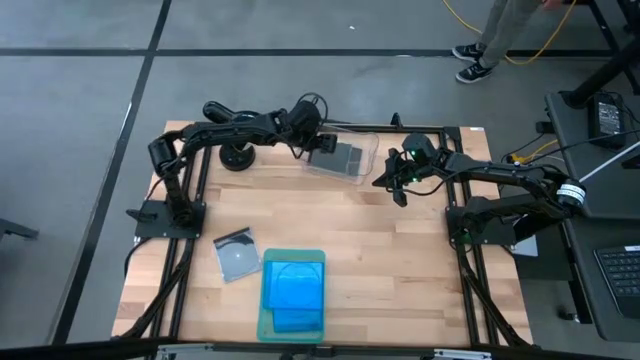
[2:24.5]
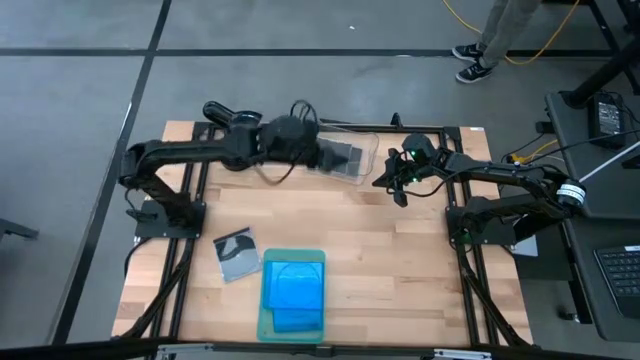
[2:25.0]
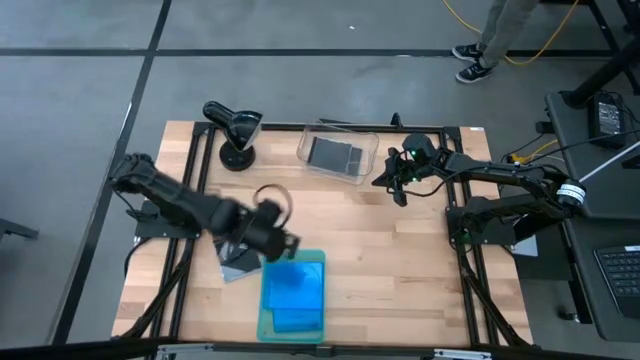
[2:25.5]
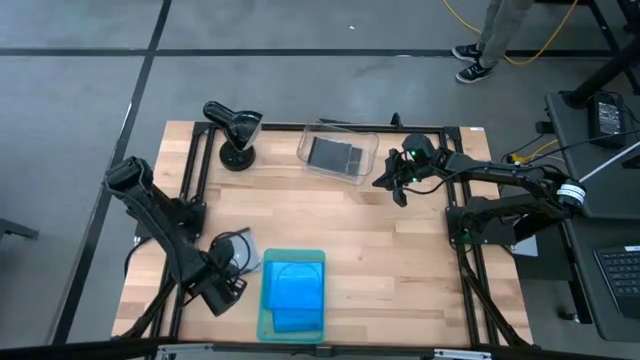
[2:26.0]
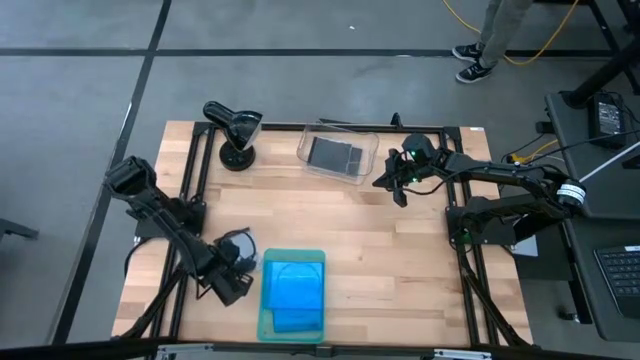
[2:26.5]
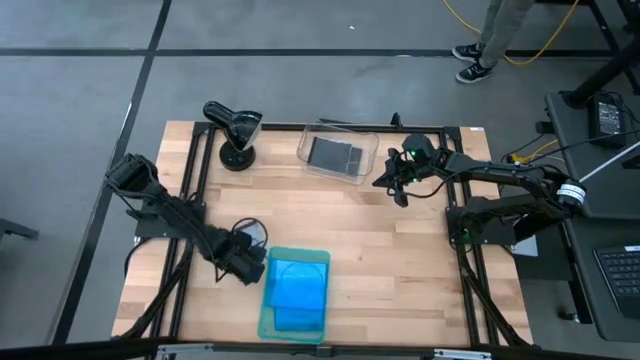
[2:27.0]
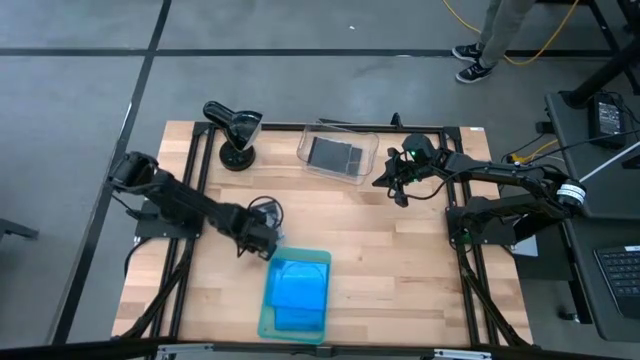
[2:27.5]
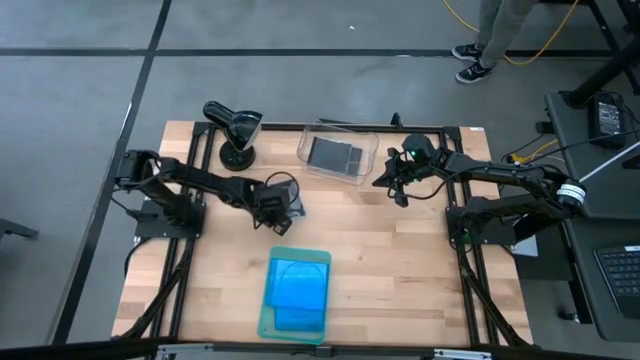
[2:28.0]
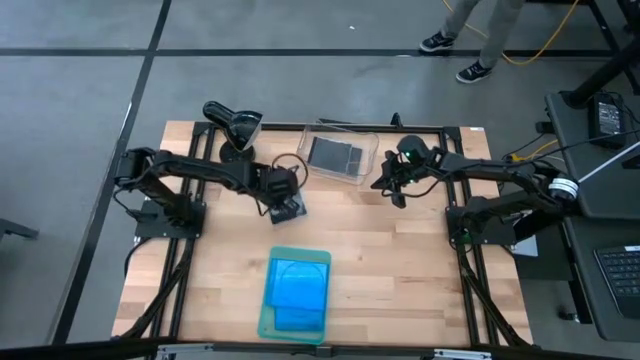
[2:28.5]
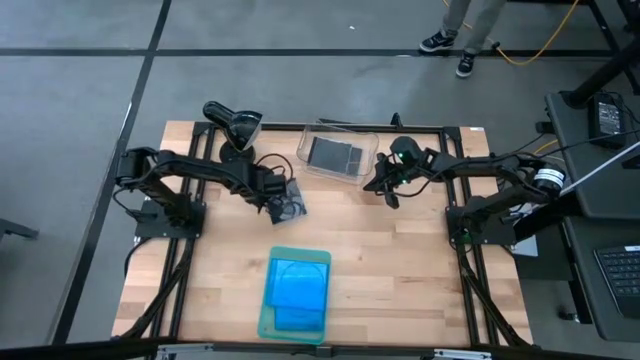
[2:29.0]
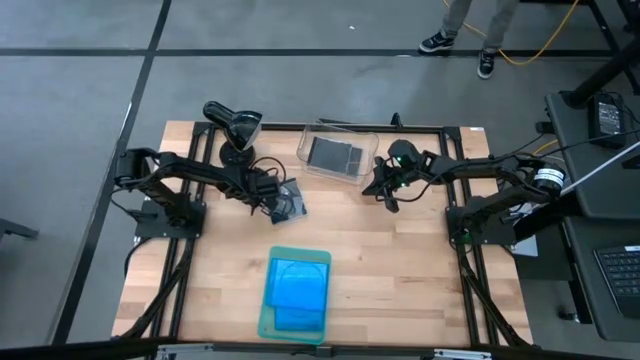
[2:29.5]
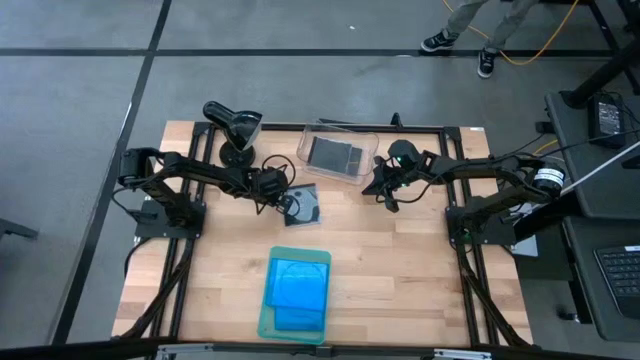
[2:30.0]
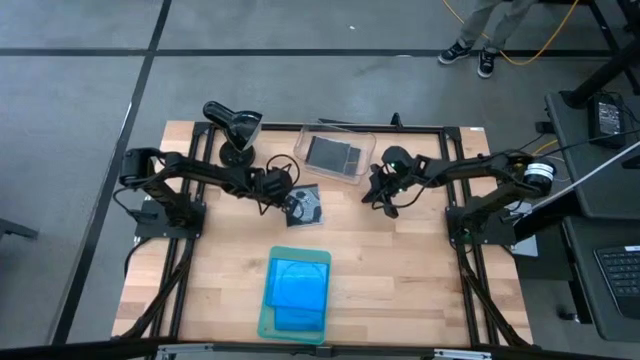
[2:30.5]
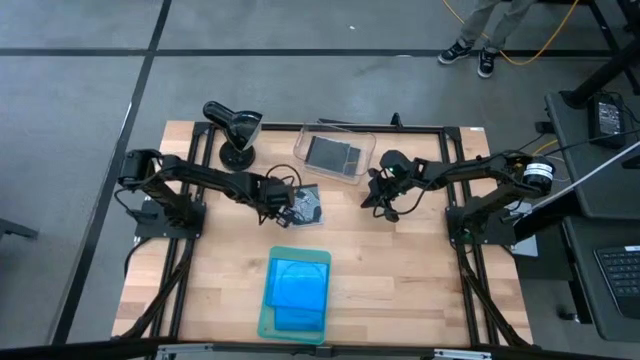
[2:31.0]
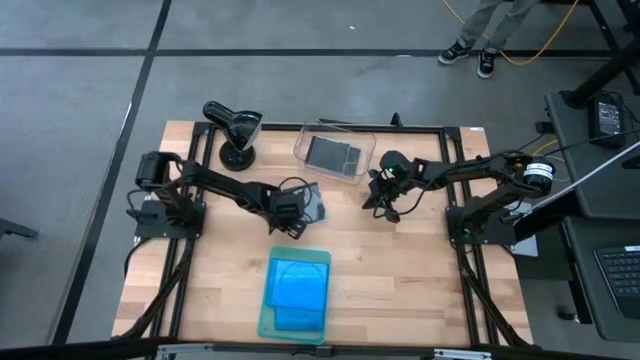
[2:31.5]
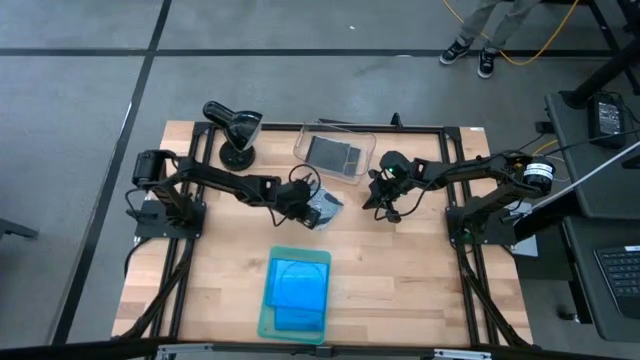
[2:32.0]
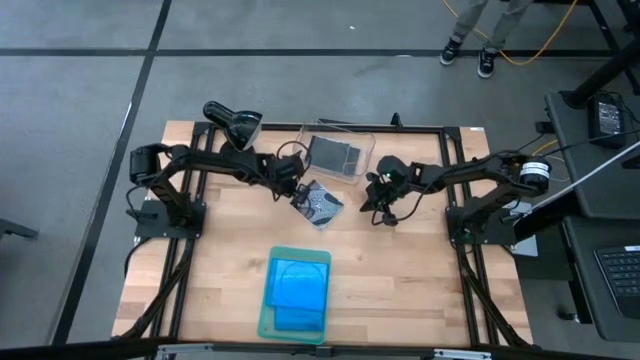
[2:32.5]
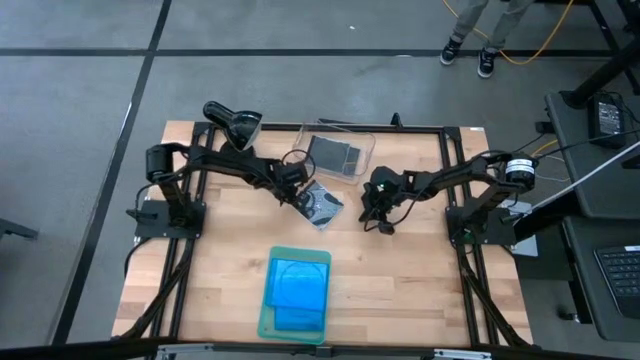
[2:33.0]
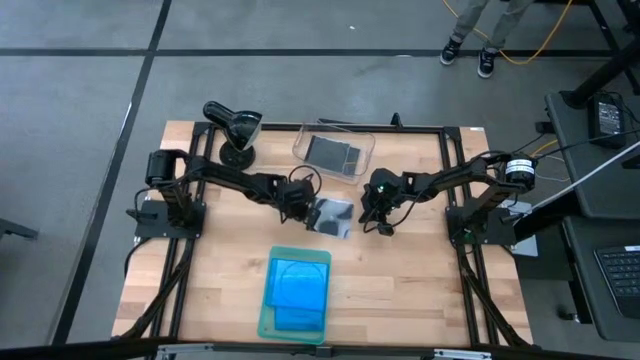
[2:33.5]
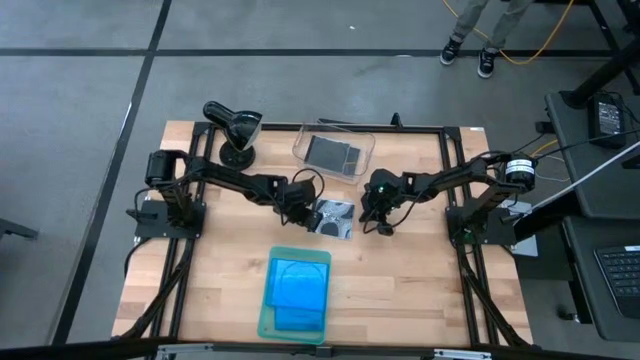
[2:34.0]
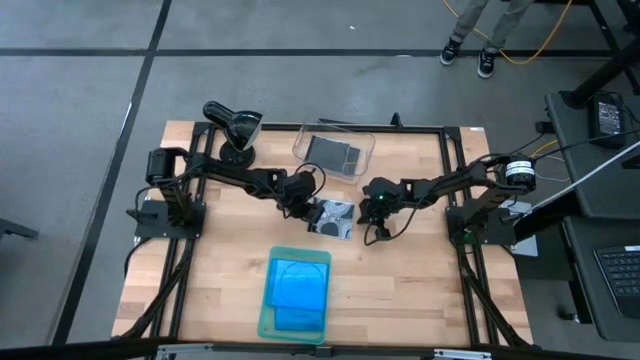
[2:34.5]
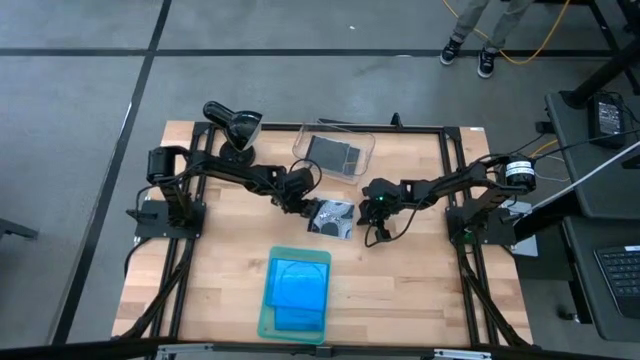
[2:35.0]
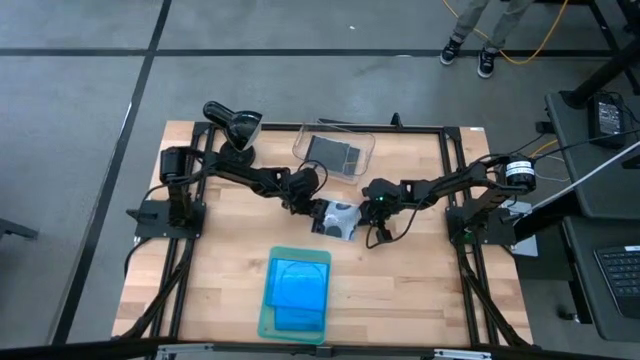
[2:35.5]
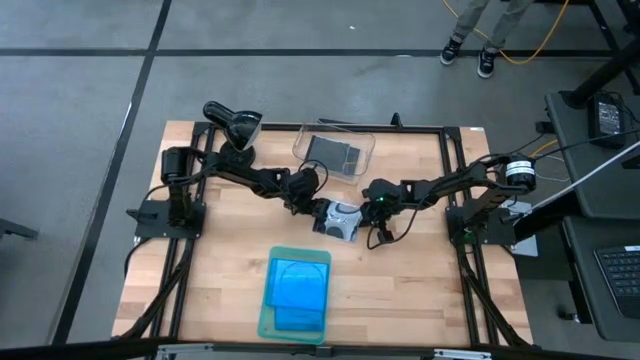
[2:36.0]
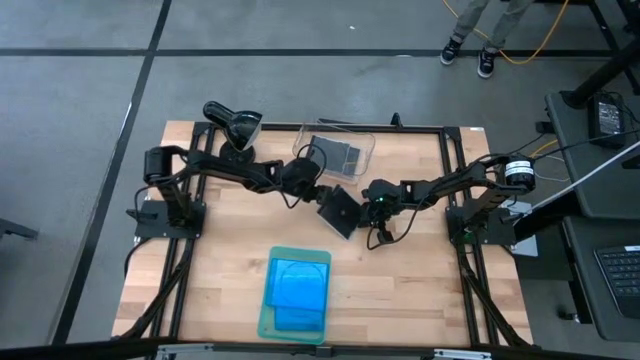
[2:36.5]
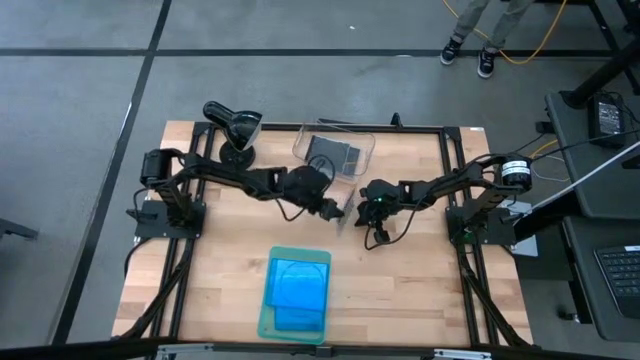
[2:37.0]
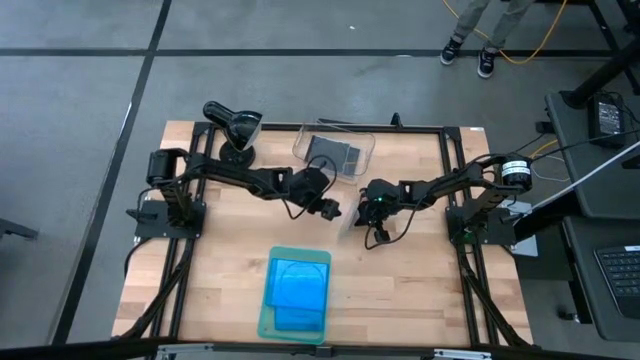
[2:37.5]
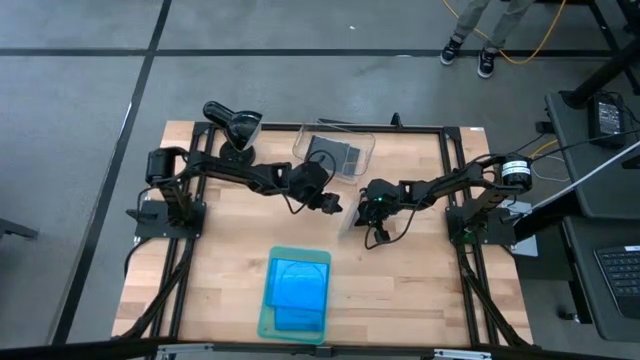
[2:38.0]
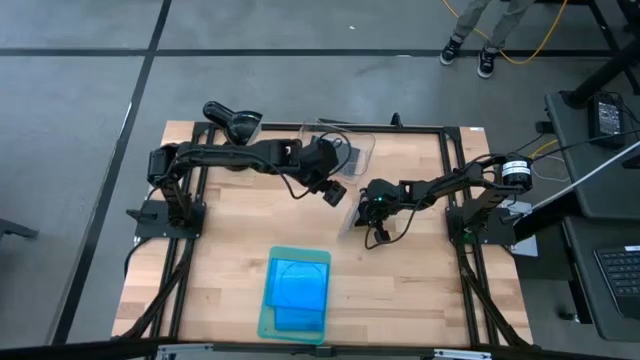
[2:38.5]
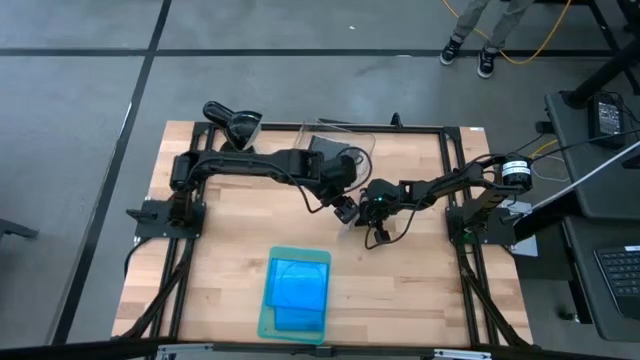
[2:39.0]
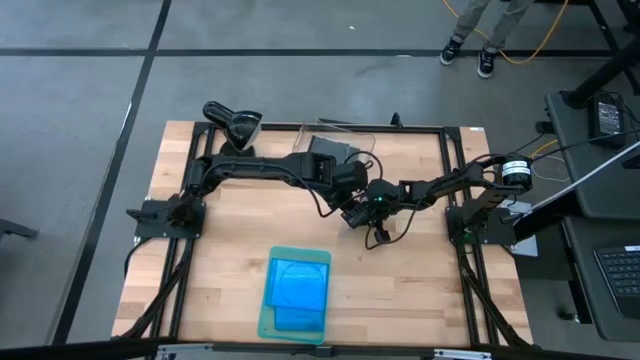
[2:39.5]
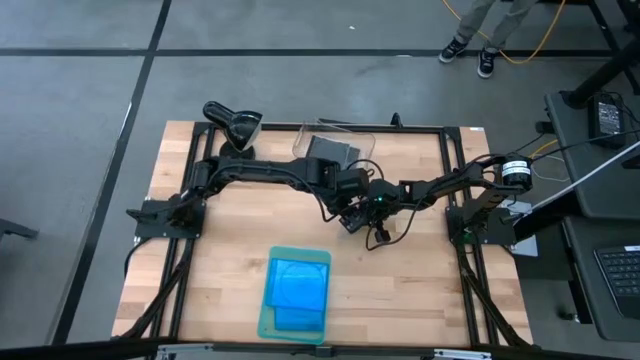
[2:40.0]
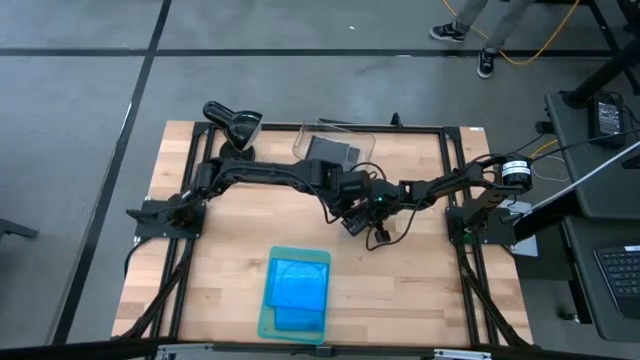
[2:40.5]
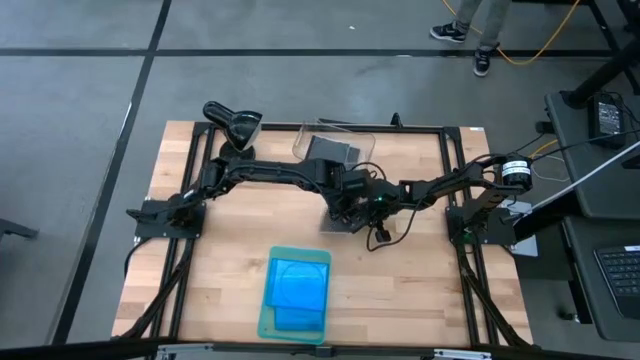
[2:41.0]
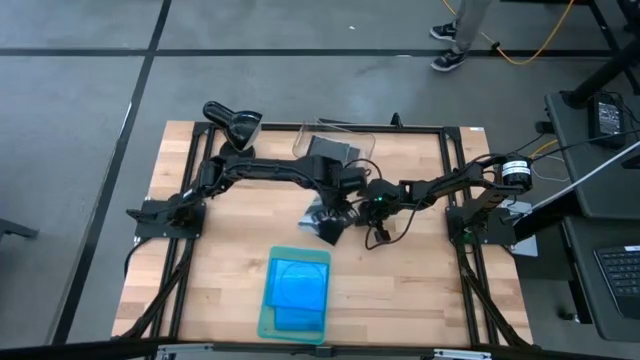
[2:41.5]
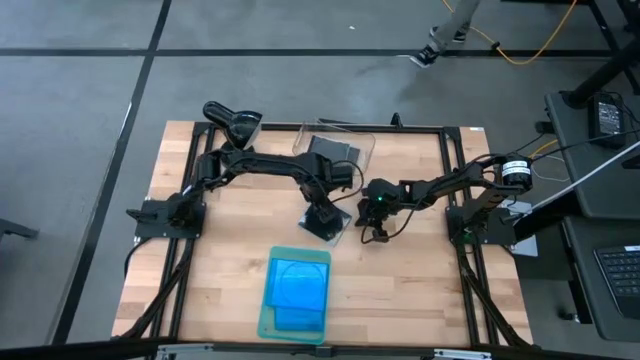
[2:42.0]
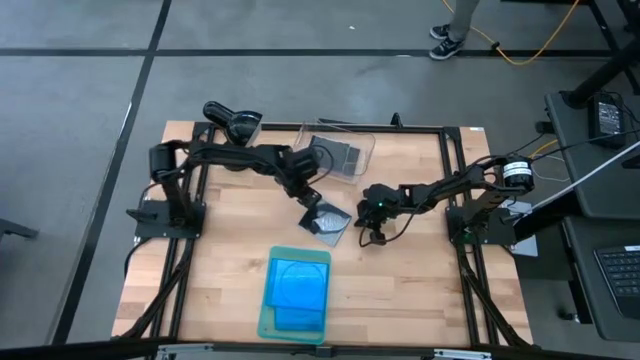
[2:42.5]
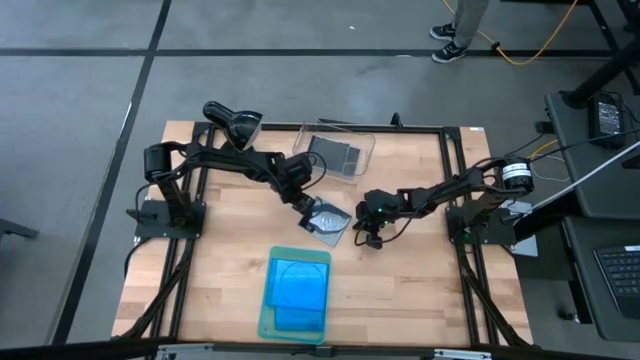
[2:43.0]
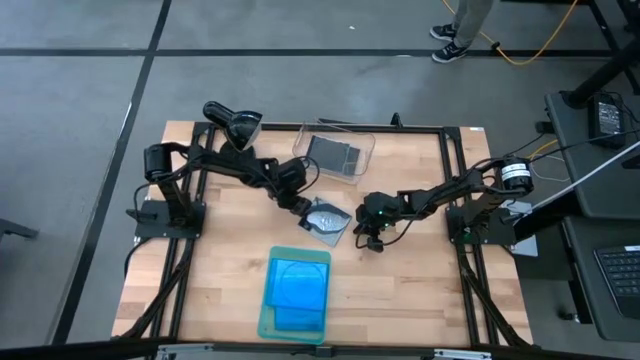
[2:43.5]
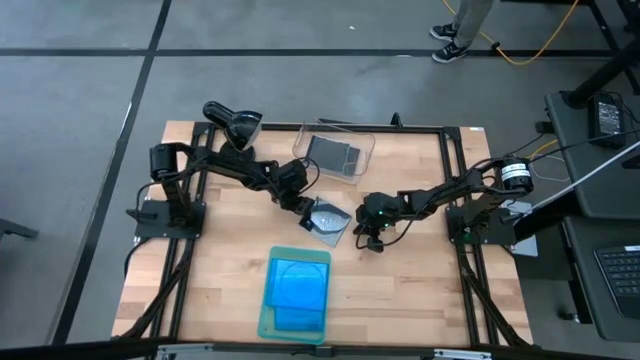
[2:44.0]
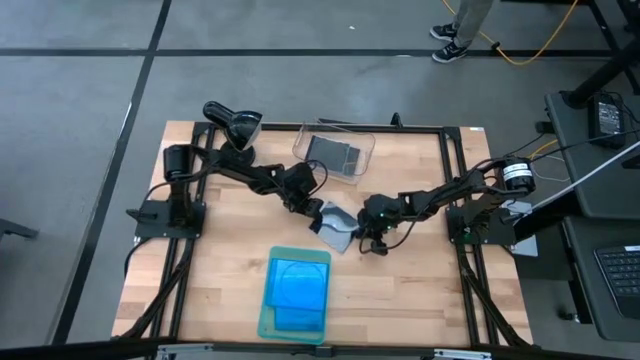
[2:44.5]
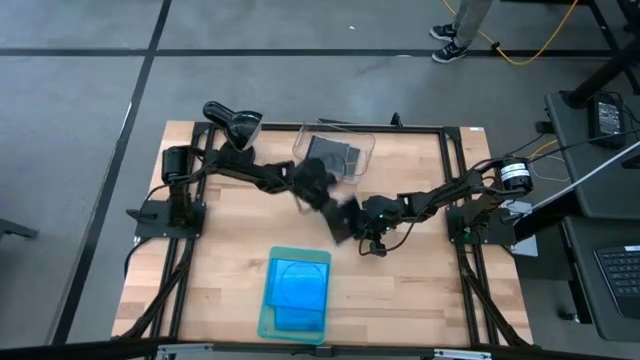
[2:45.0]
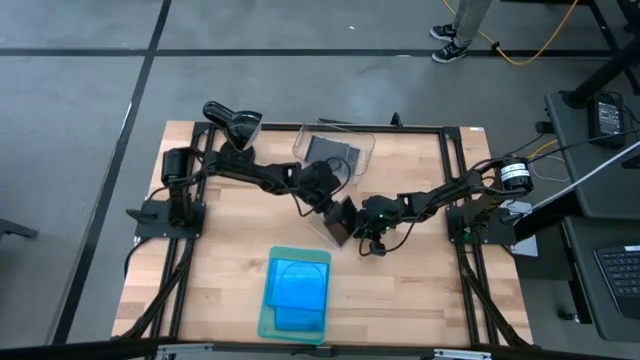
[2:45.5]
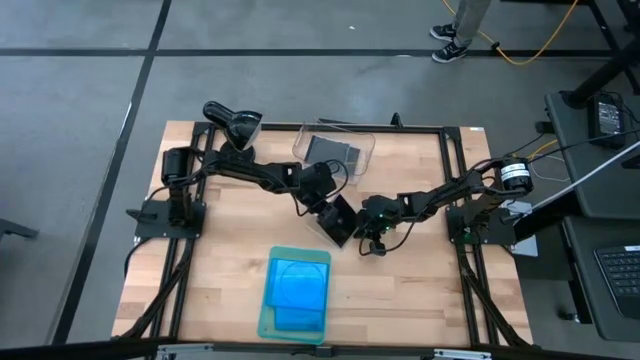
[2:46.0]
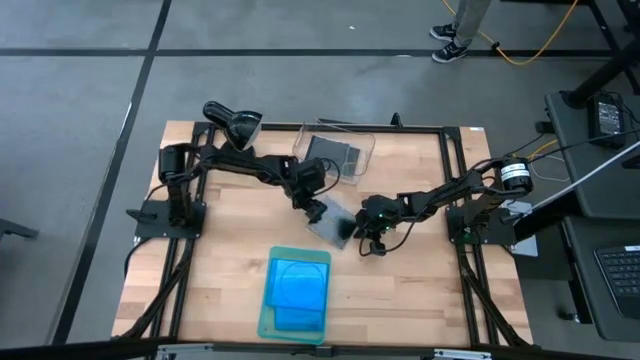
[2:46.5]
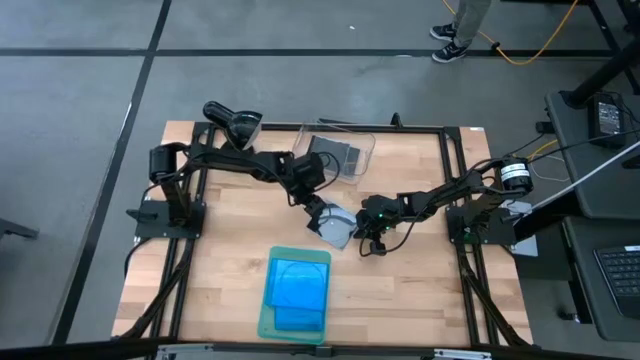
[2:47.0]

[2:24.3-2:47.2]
Task: Pick & place jewel cases by type
Put the black cd case into the transparent bin
